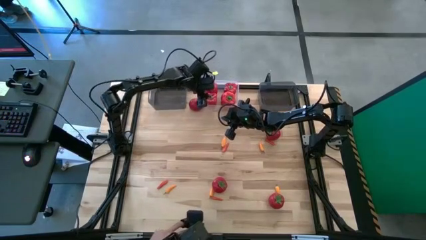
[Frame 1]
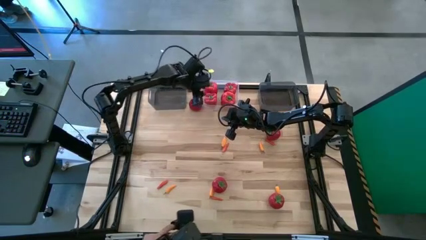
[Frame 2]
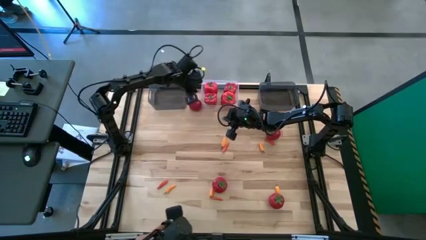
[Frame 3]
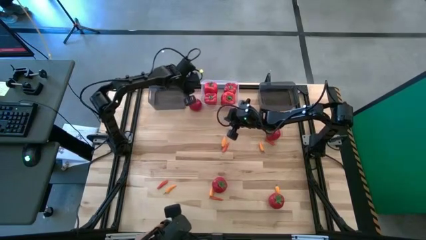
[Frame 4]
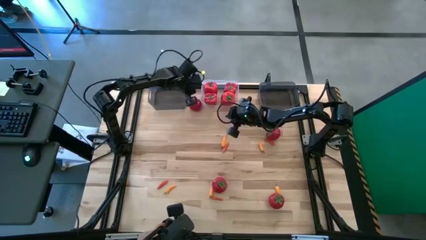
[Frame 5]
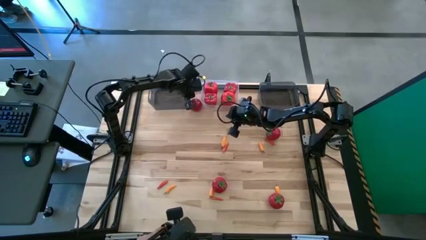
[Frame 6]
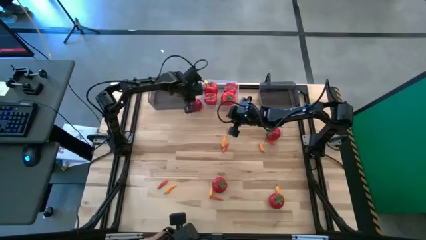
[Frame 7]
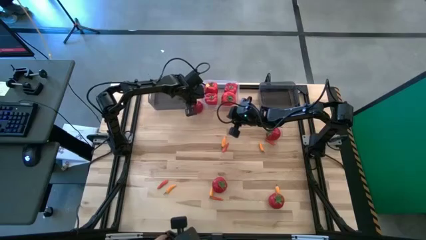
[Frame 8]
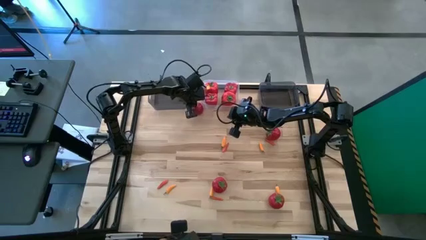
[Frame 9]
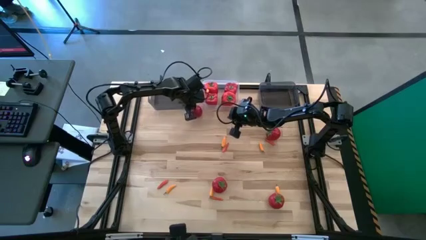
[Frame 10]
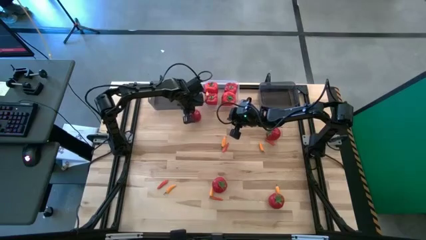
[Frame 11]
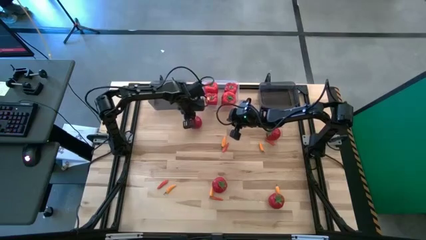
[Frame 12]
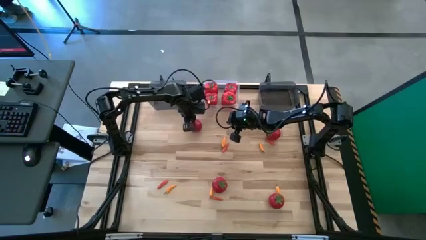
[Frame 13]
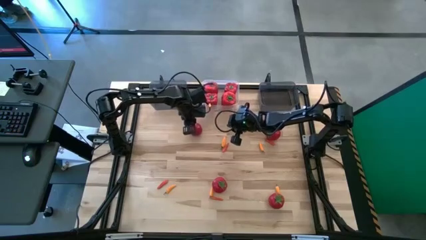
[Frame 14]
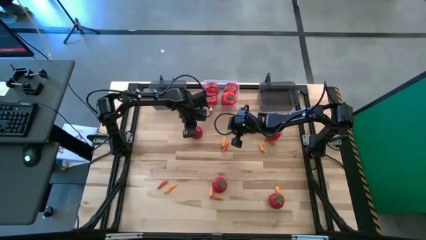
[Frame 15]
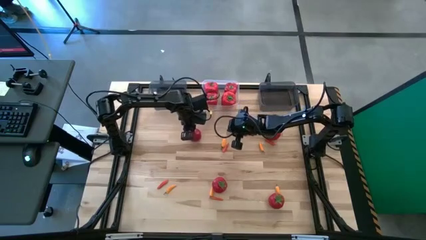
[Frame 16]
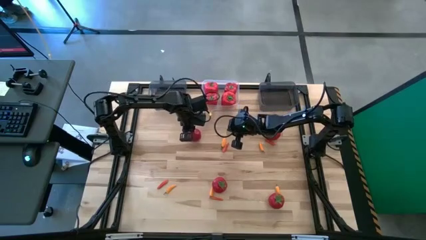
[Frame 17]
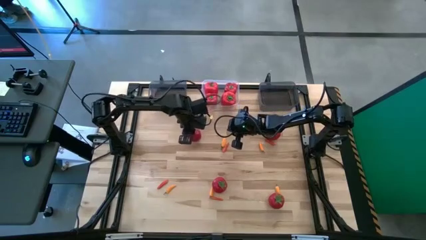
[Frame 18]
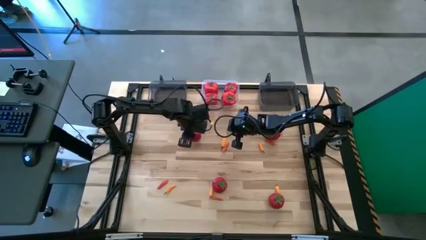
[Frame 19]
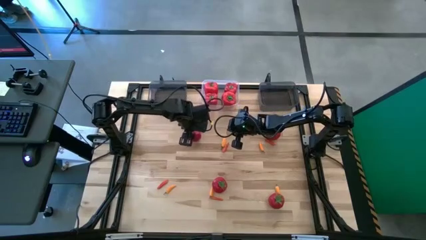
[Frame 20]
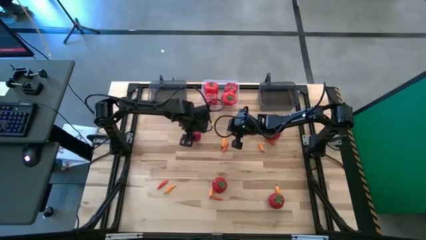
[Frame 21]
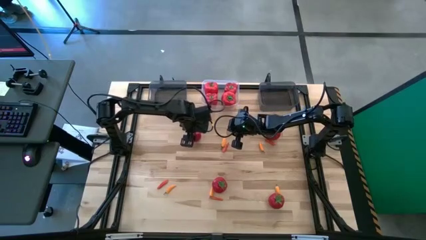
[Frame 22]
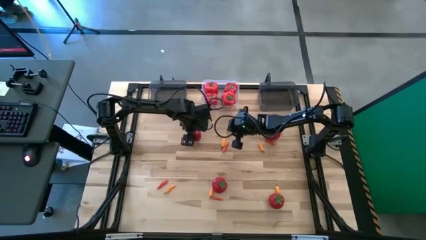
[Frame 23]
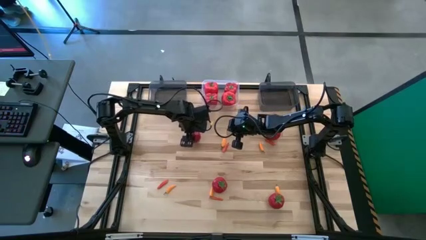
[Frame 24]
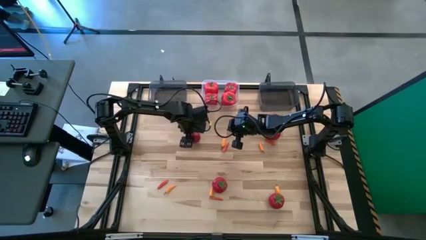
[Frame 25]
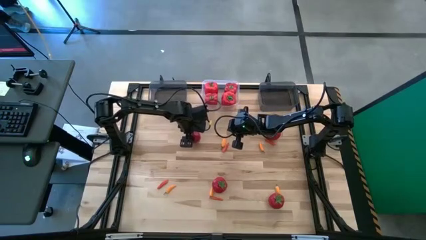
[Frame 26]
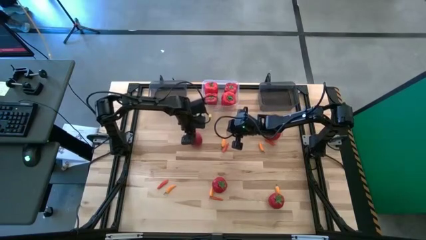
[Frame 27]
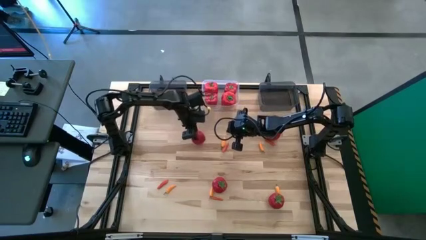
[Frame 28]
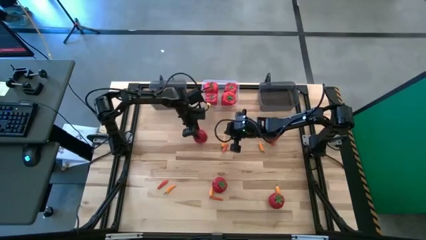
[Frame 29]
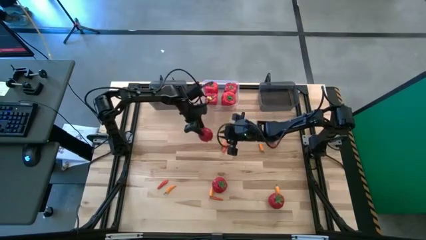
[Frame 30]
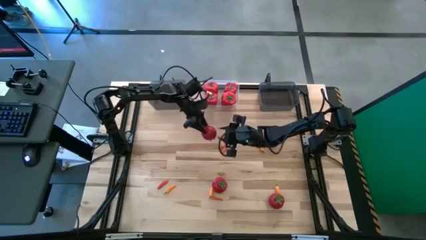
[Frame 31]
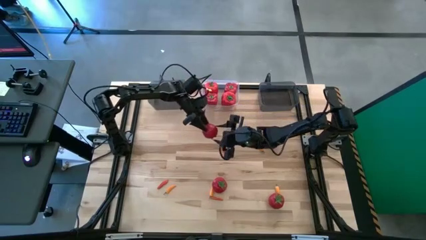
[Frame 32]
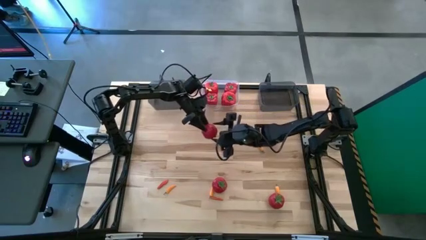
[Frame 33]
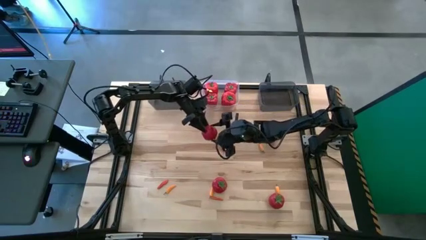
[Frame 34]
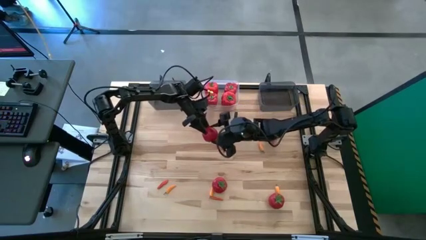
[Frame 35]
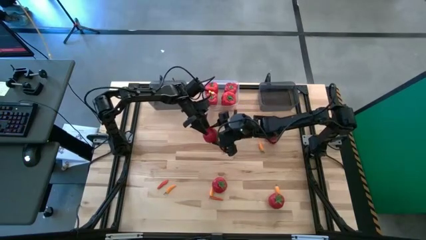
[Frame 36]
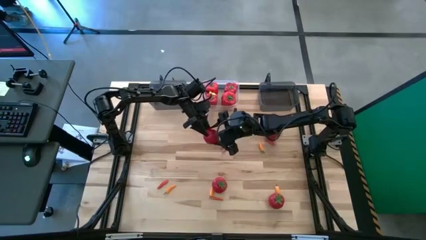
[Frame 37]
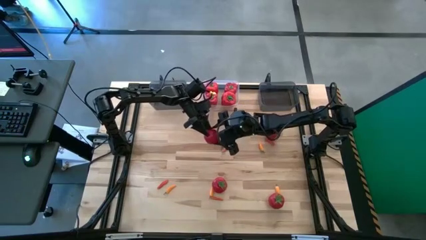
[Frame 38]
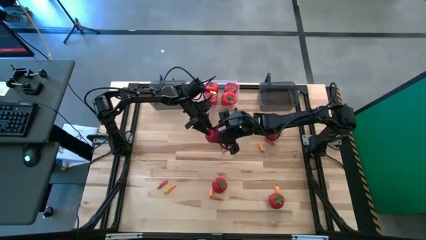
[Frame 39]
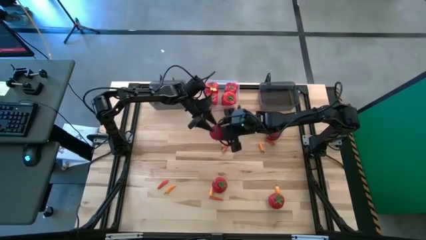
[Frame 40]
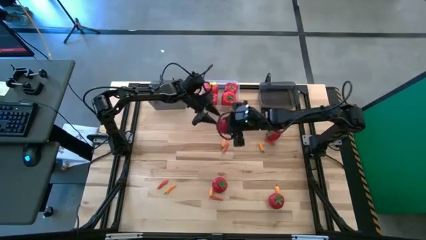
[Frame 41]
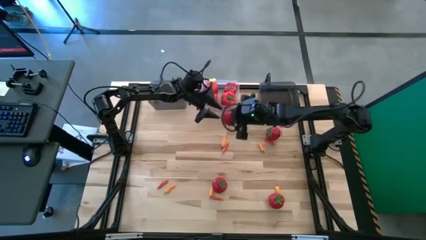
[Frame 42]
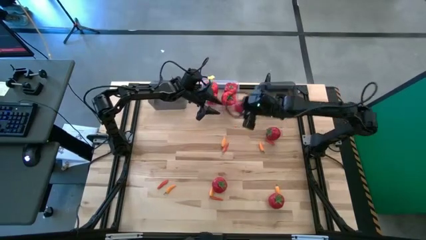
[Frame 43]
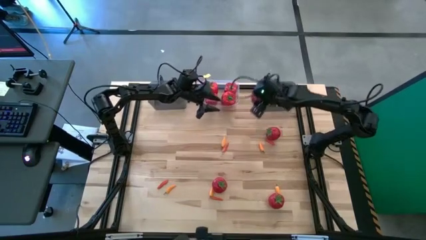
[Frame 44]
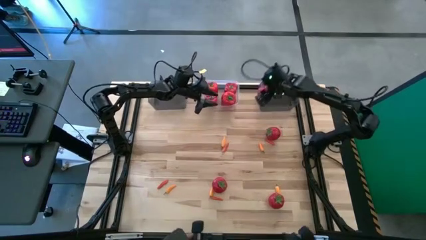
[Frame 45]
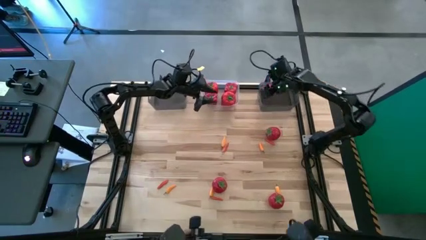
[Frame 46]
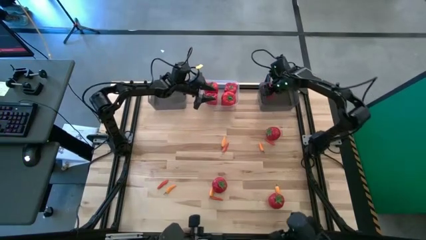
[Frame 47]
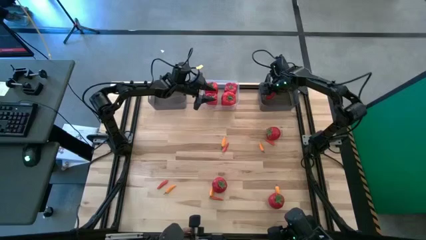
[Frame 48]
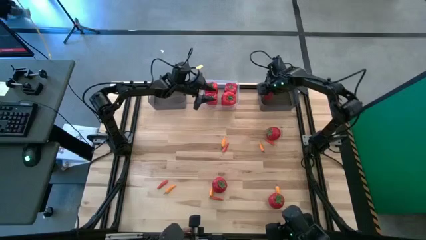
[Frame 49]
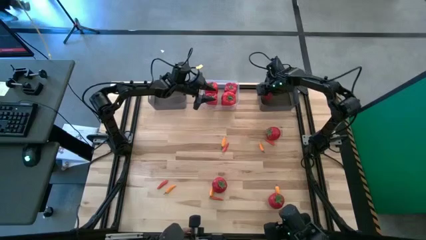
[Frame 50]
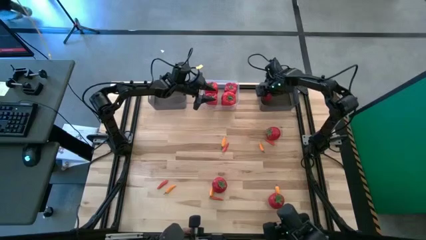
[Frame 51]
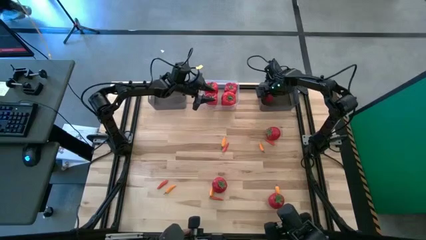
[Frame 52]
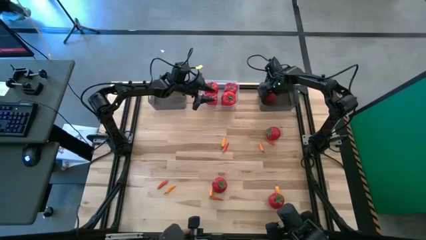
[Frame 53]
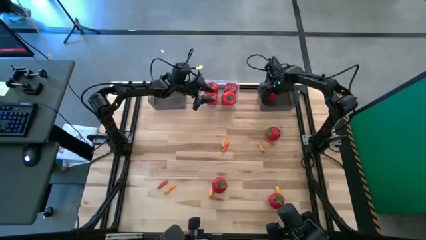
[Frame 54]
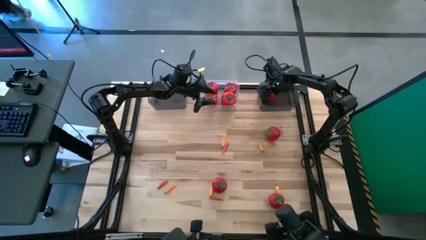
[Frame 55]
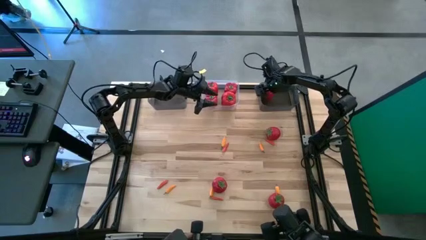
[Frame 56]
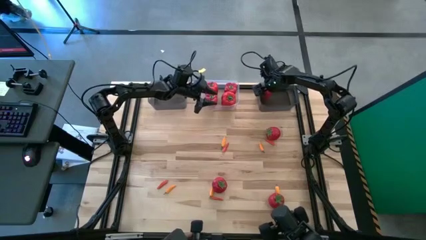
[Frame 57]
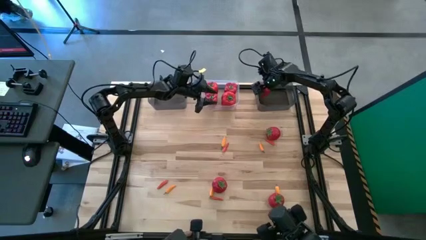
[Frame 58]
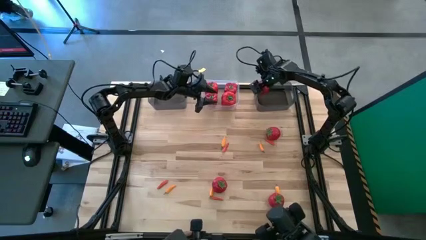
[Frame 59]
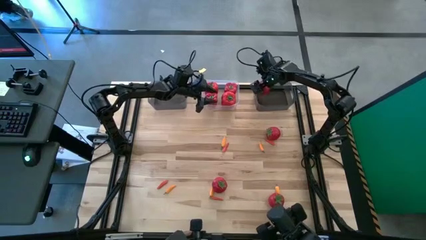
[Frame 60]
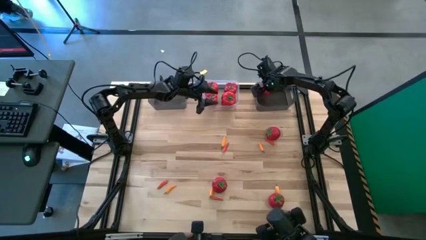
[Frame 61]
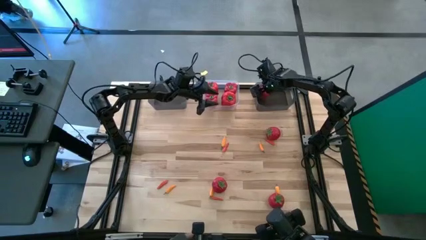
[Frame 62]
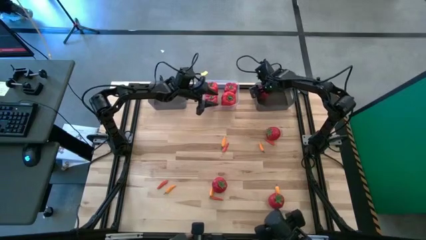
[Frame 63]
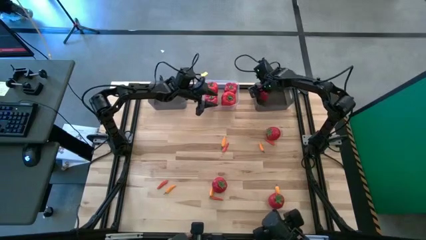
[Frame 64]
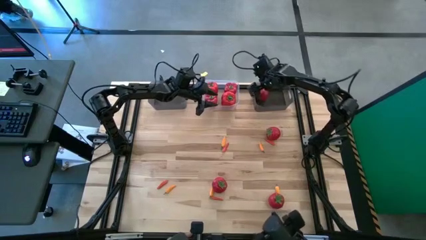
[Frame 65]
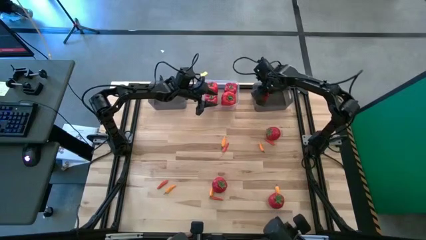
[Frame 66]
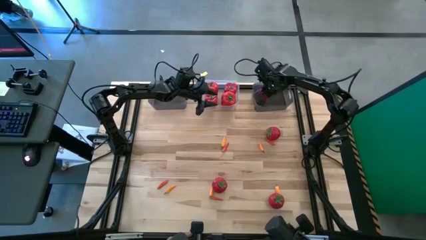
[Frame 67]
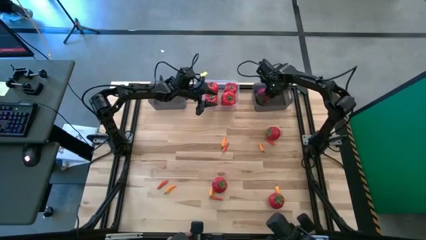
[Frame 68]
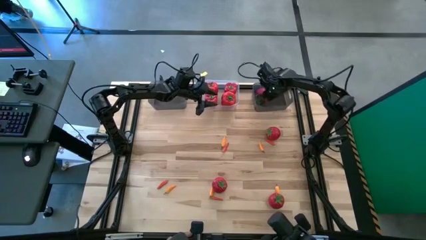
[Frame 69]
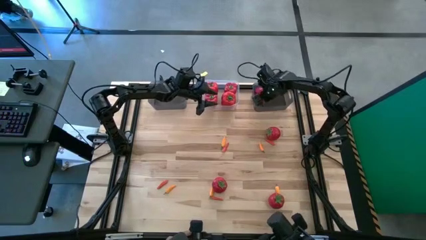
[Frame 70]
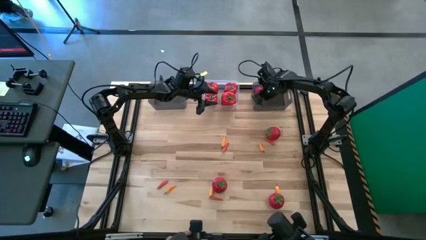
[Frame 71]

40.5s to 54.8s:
Task: Sort produce into baskets
Put the red tomato into the right black bin

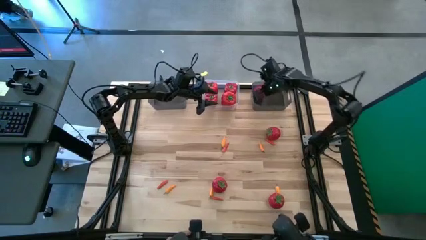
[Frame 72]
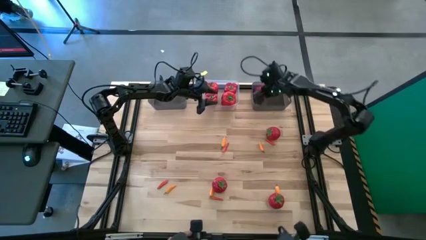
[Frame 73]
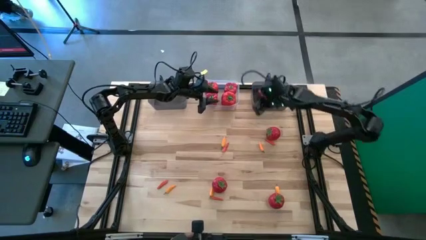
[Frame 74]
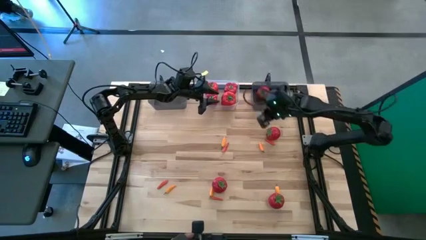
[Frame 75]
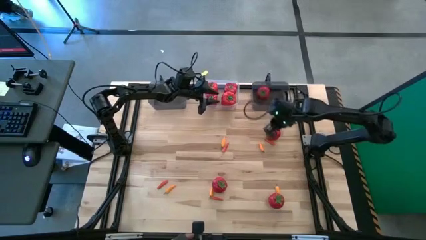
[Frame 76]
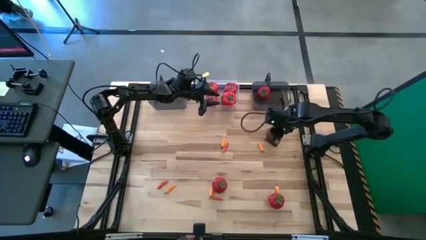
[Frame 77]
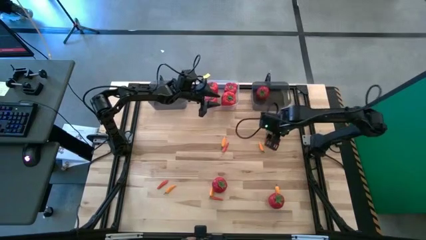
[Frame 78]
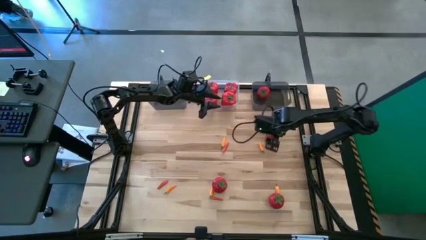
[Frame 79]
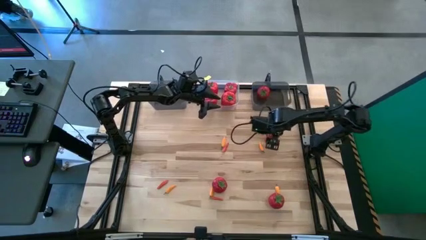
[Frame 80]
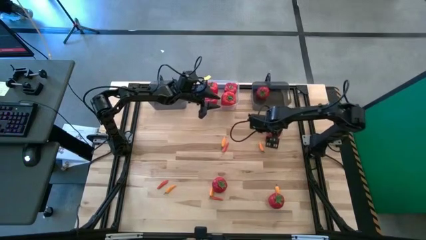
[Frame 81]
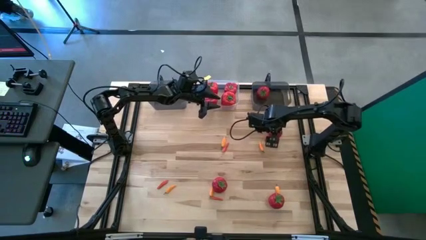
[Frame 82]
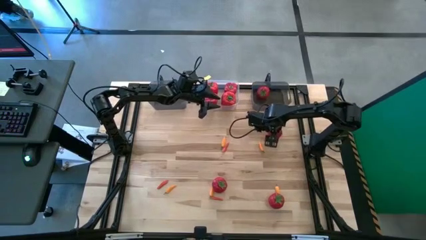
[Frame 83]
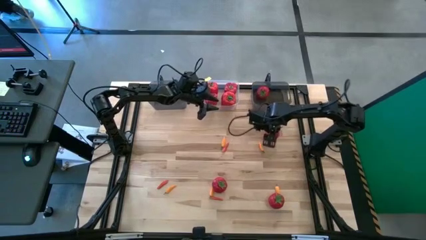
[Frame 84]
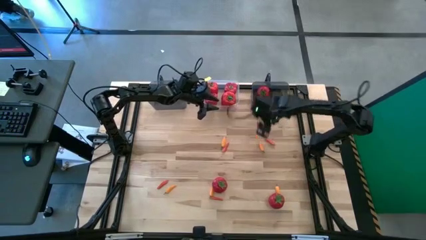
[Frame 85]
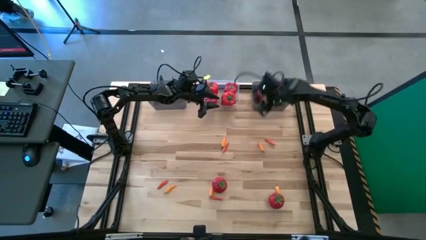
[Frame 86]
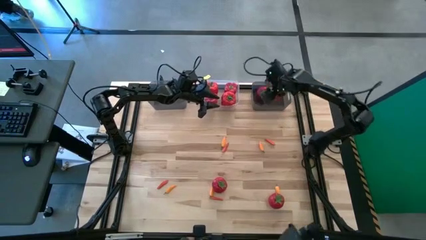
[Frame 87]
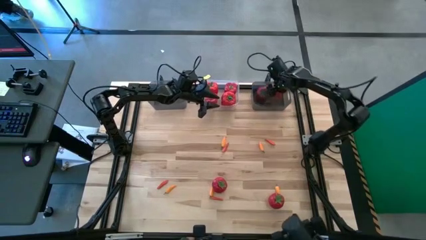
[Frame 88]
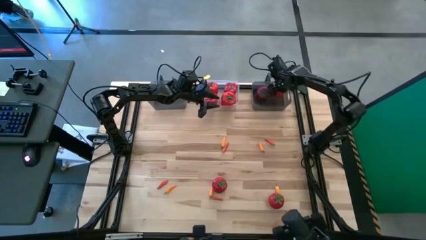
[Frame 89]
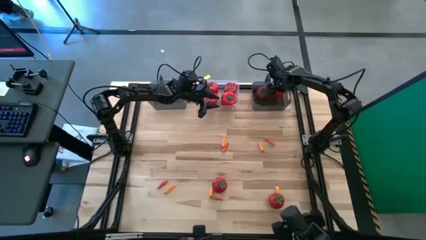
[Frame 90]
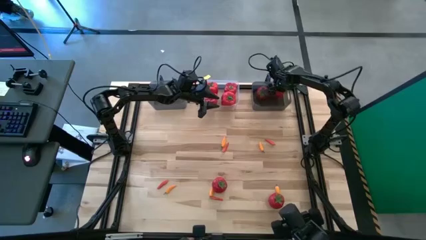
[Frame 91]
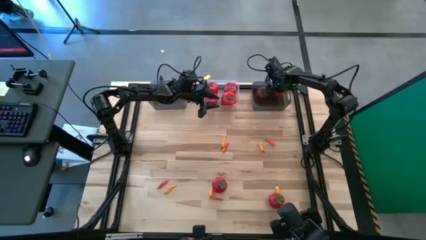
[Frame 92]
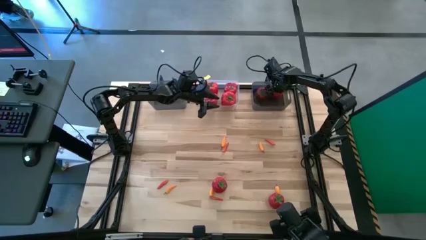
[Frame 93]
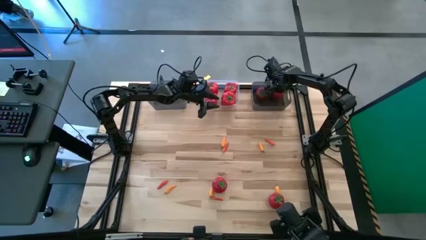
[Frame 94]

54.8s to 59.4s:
Put the red tomato into the right black bin
